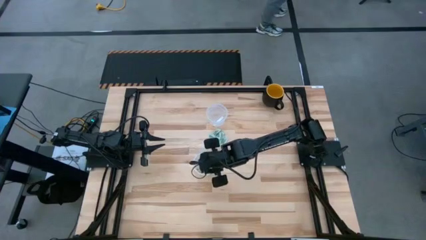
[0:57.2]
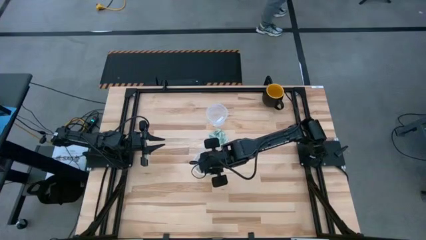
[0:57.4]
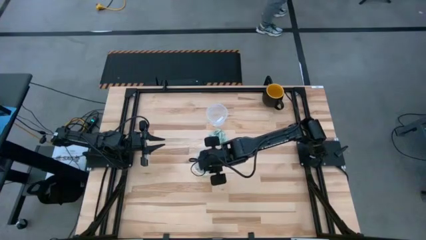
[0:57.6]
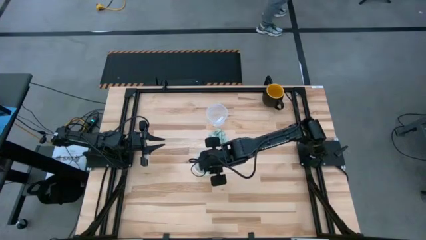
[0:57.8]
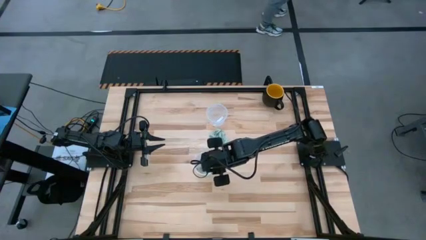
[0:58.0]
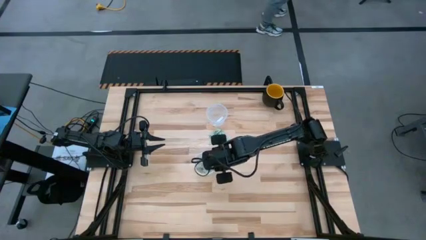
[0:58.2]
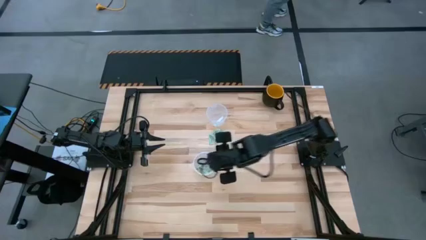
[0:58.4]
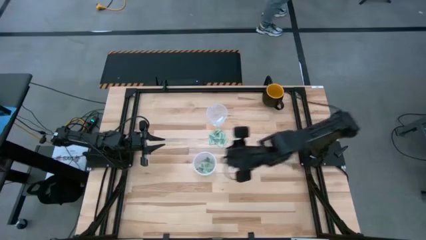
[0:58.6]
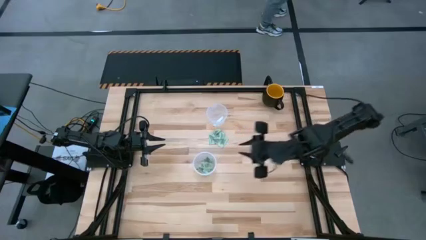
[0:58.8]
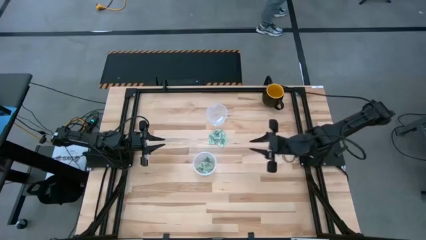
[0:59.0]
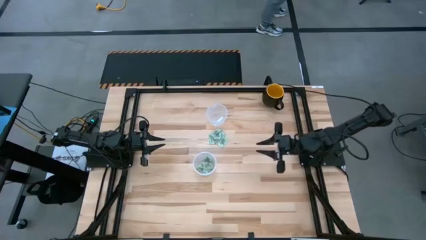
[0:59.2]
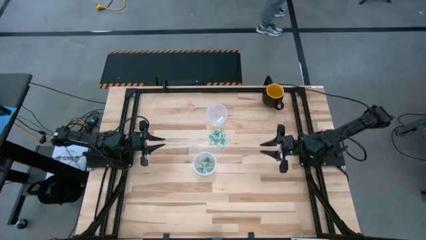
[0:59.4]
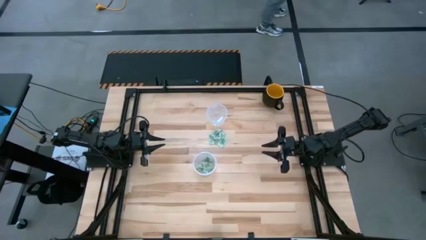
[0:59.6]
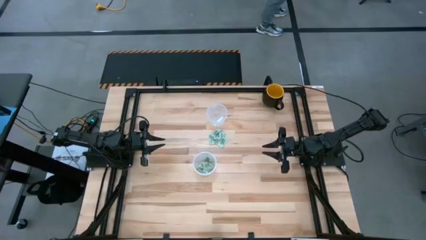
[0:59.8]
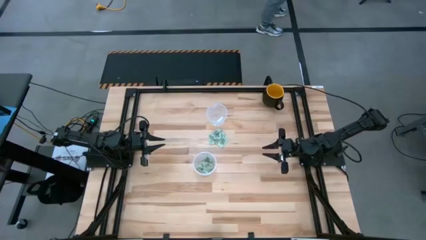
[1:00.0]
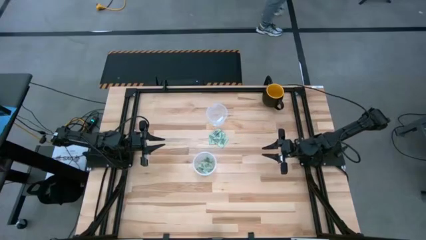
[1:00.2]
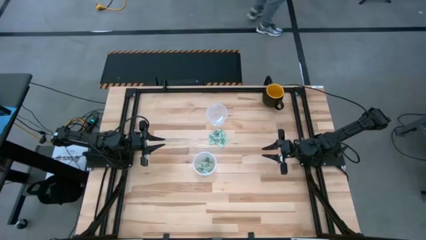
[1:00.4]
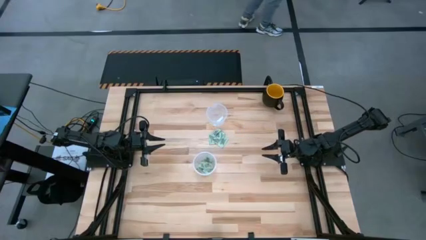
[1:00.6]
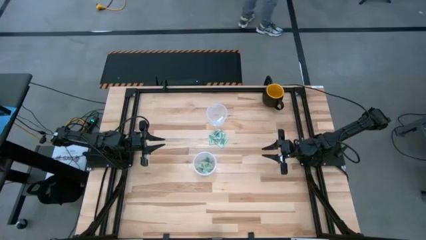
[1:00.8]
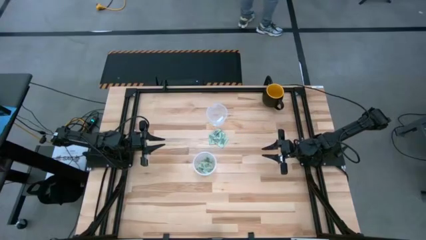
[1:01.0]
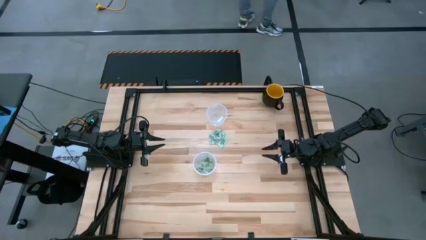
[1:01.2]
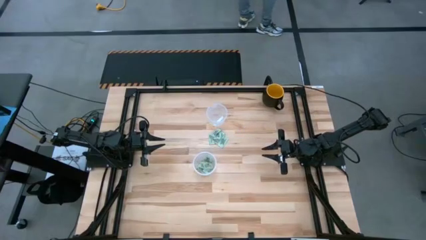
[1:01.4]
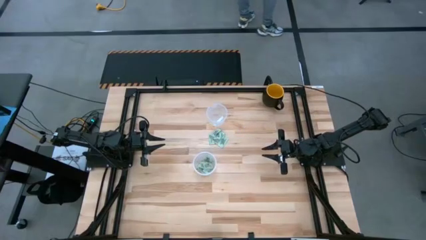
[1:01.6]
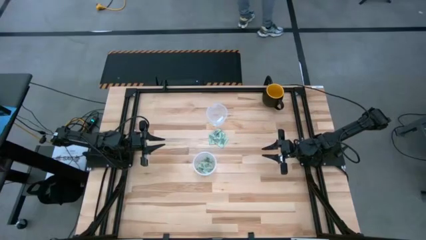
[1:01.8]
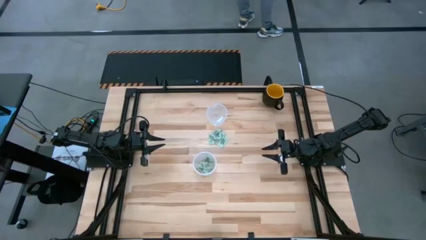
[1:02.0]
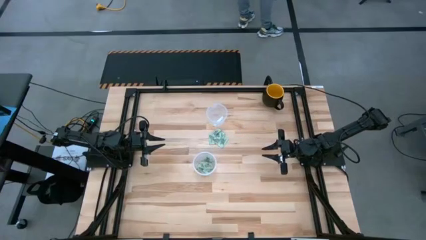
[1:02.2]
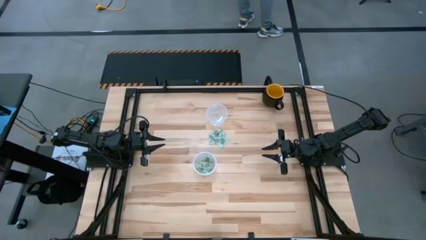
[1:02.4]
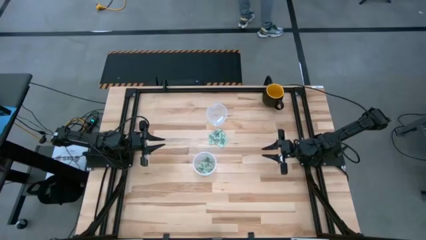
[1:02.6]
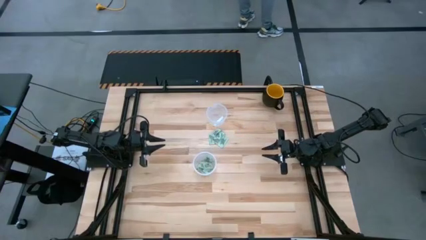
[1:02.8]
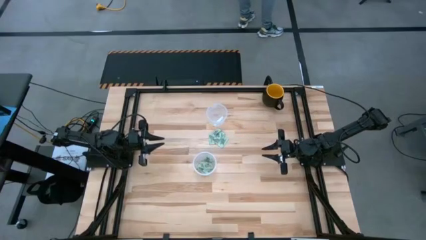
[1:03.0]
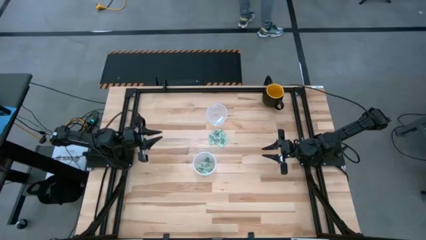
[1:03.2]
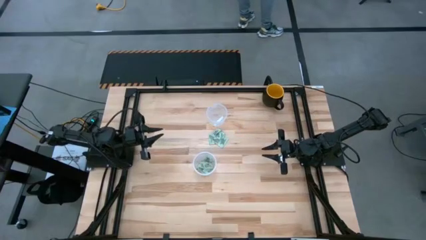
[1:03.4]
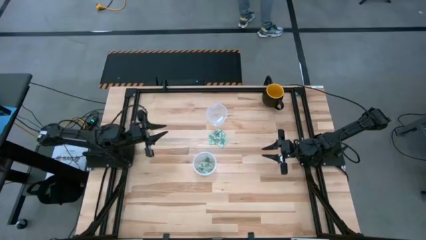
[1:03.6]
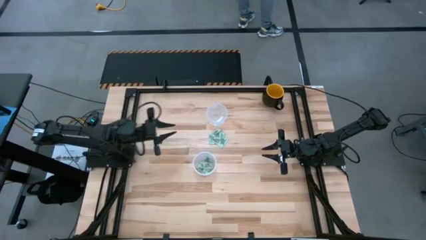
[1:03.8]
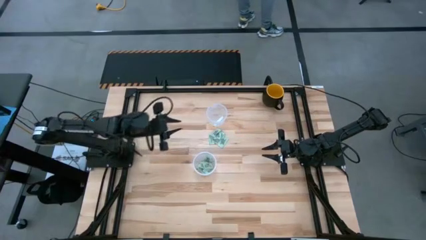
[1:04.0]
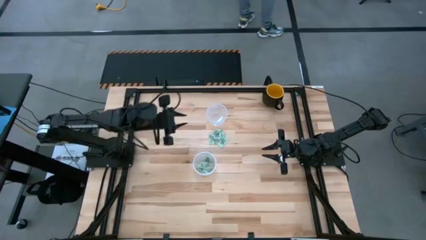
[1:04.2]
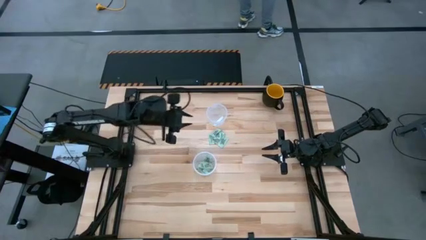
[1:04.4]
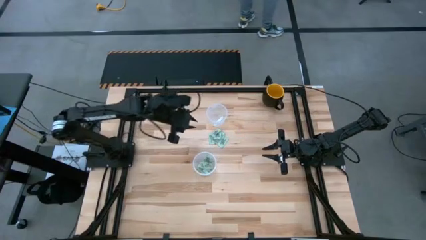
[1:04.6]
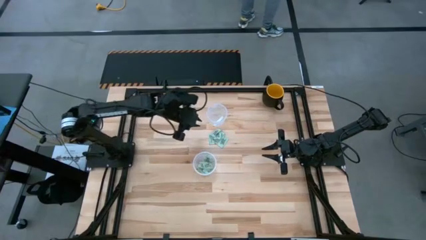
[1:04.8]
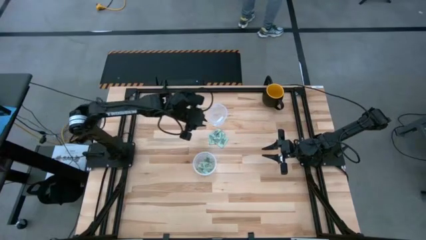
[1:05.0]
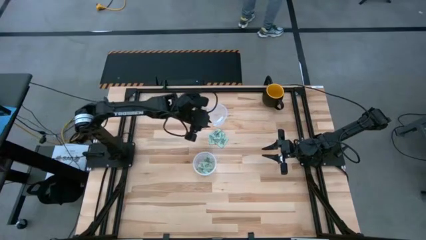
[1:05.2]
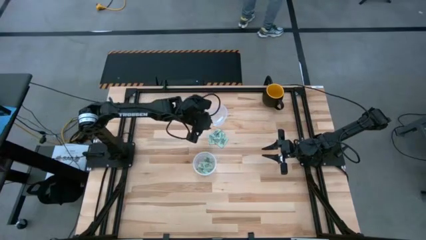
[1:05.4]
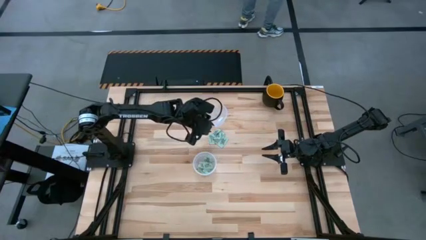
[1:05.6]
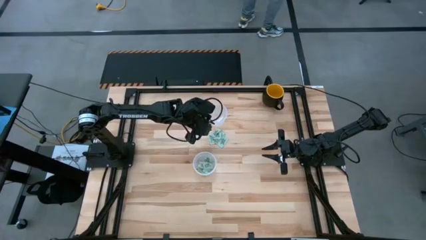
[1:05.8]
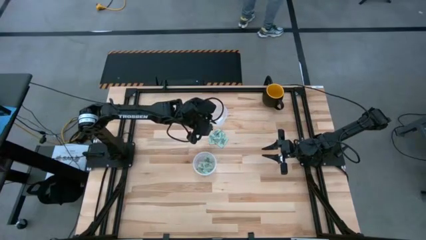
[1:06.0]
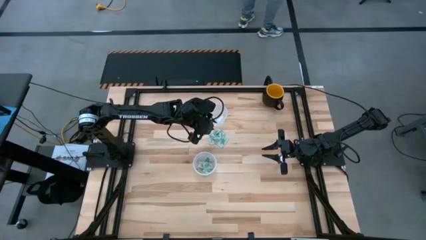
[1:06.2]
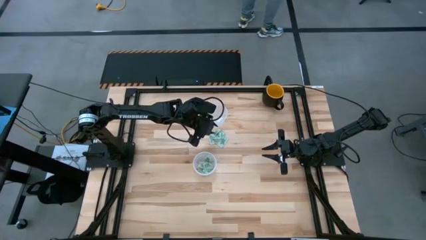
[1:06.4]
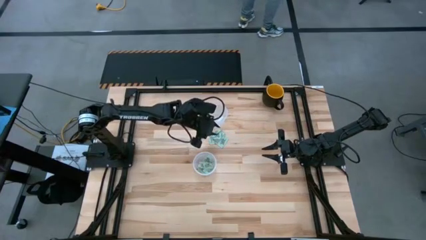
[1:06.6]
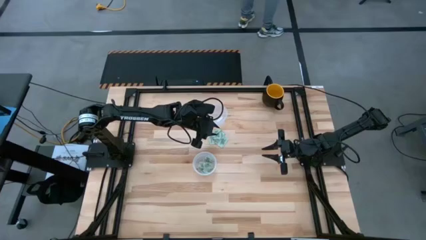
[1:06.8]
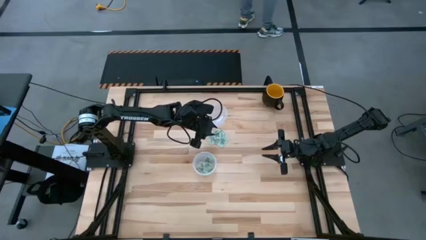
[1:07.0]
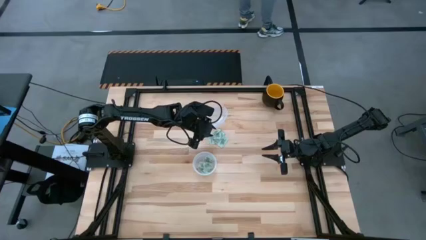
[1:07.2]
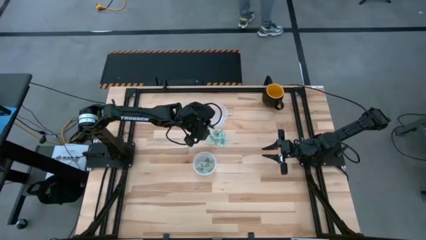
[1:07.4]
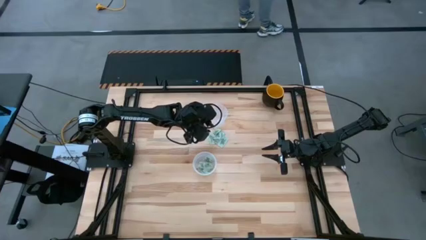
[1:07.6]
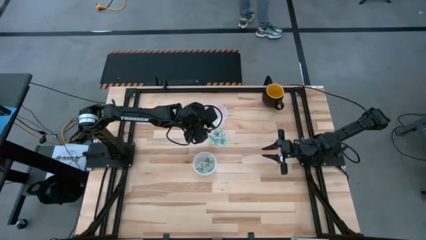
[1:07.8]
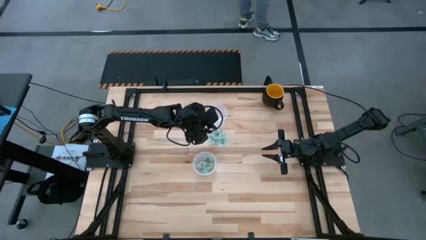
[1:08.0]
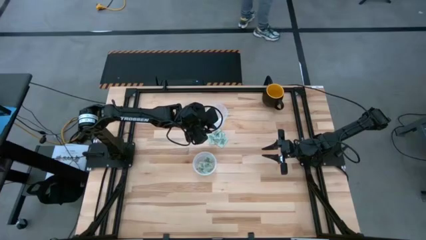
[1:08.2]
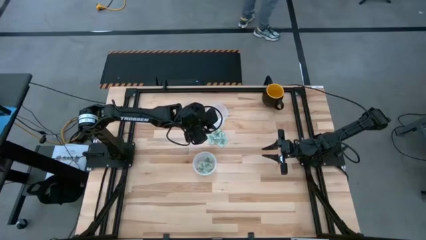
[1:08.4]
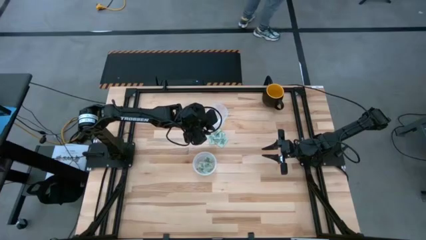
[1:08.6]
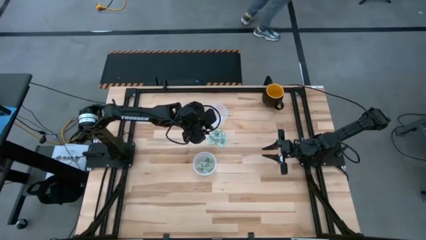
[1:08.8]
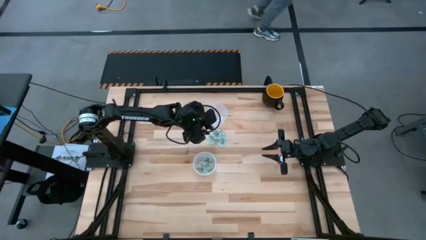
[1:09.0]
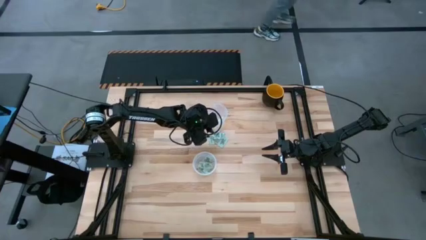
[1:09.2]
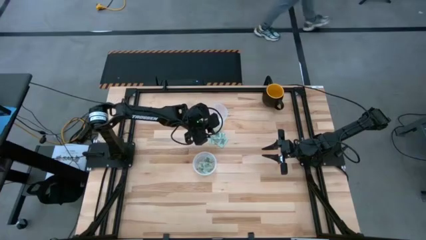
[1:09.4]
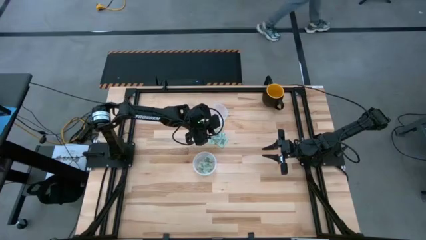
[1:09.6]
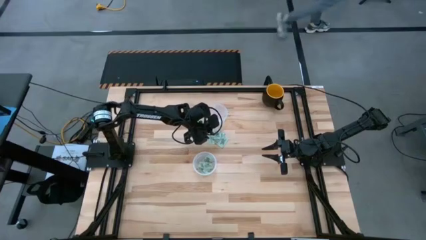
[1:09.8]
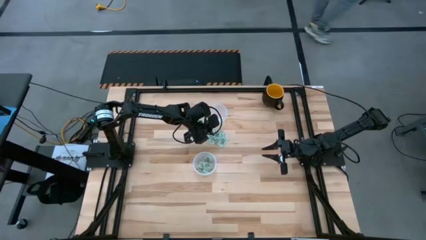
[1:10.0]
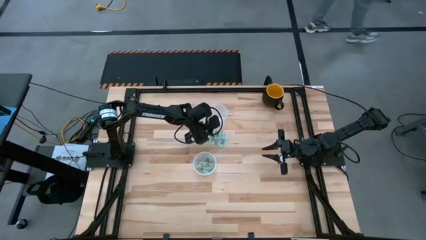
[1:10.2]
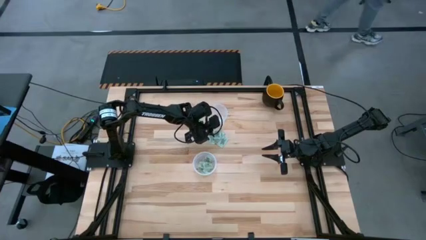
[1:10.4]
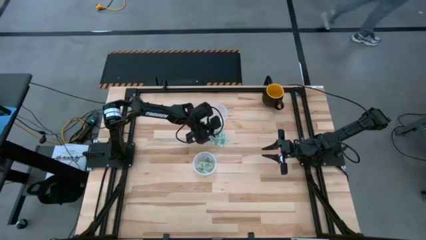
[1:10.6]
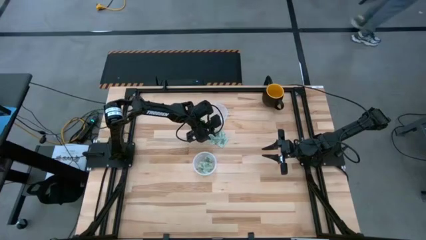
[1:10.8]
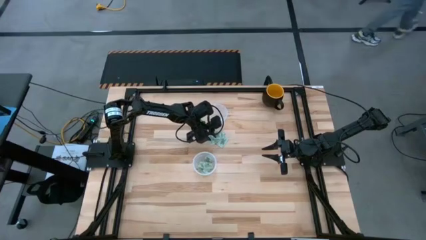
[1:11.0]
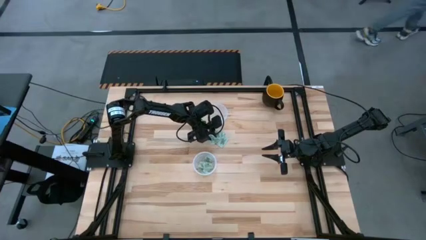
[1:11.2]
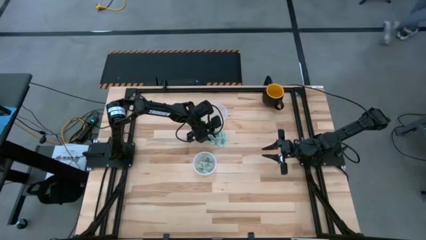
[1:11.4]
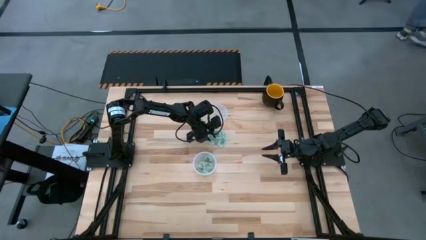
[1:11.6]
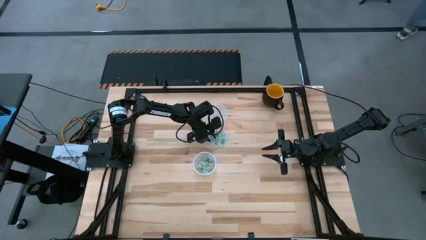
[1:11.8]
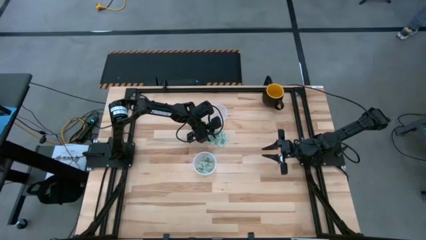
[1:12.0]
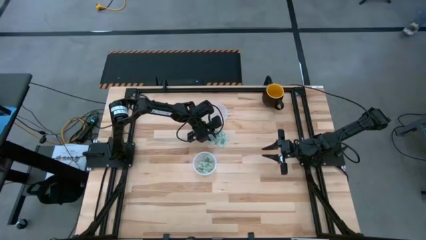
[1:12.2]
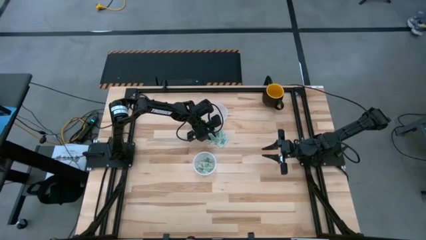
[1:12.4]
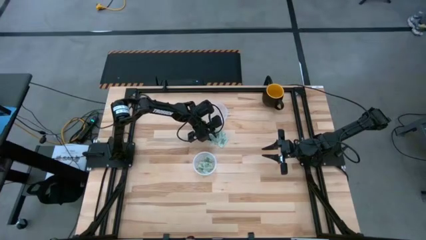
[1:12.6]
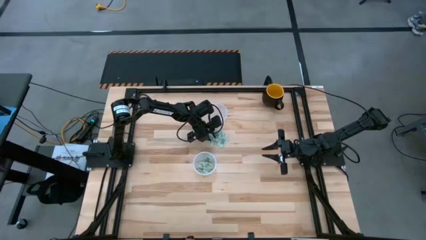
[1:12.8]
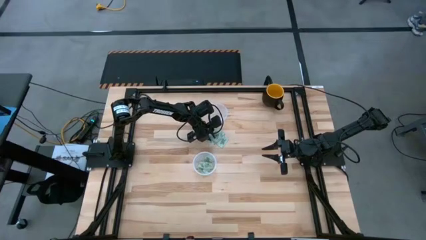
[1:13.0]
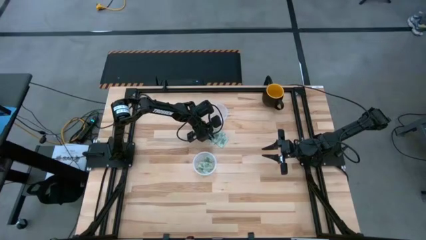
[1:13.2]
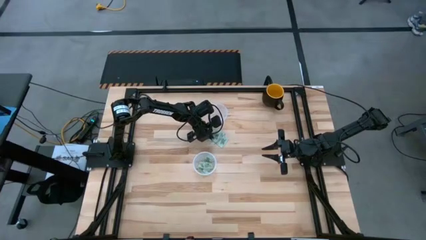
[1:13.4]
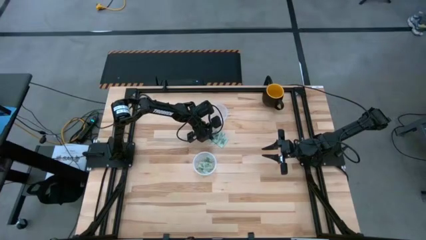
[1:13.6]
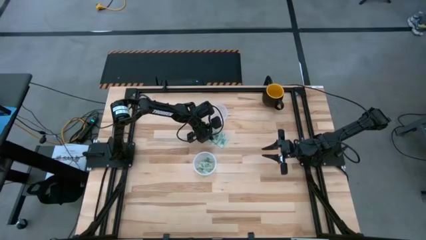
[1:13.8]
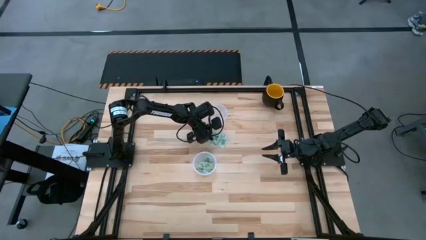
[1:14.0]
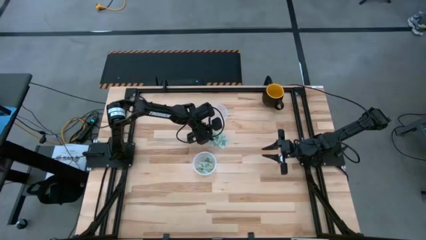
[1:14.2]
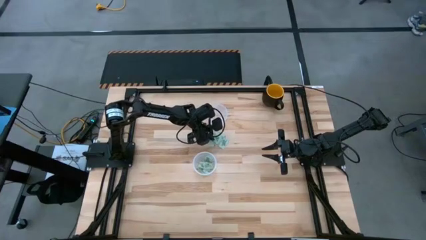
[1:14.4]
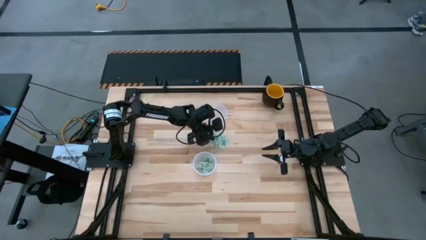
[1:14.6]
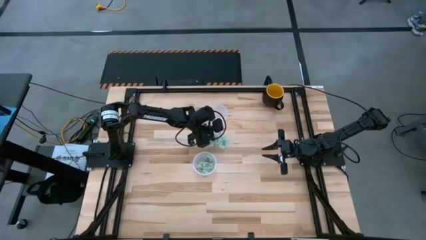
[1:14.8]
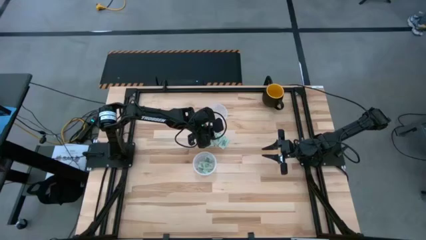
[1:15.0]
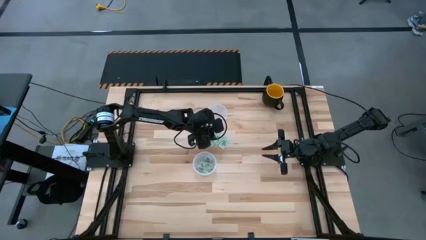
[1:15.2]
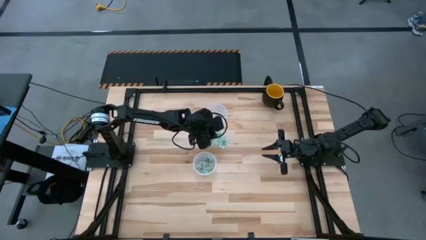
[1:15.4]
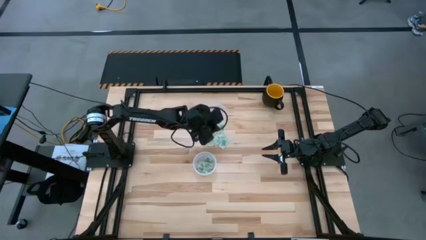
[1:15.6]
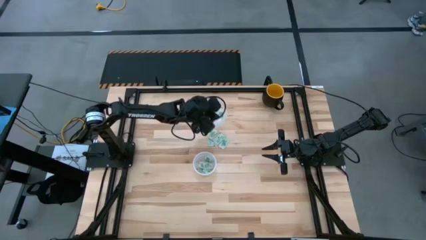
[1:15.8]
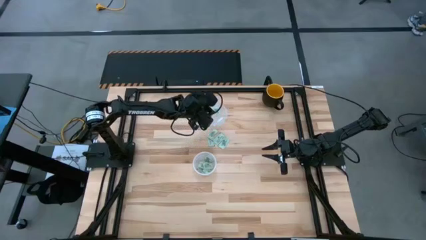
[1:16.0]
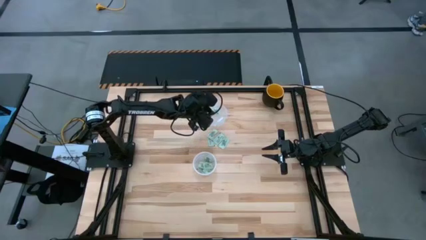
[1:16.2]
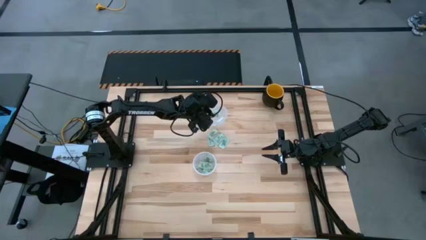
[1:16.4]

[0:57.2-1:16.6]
Task: Pick and place items into bin
Put the top left stevia packet into the top bin
